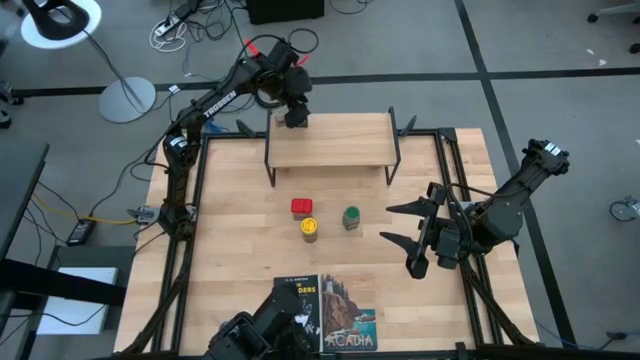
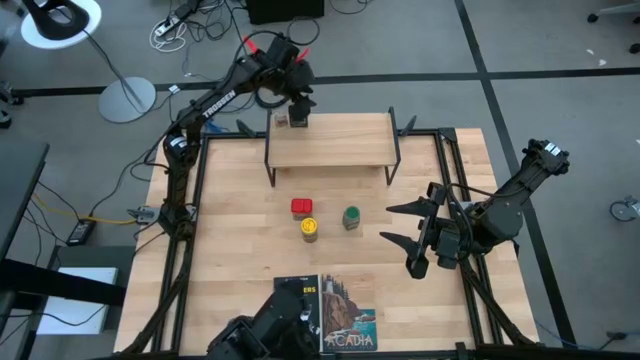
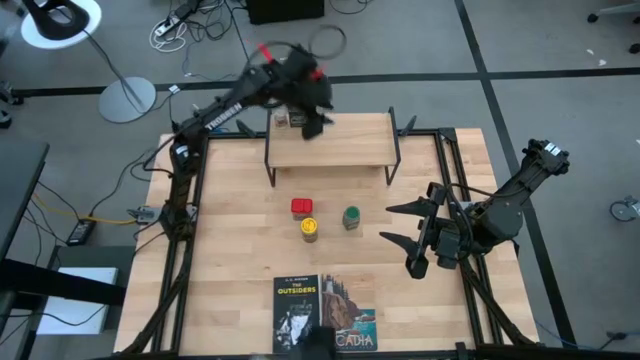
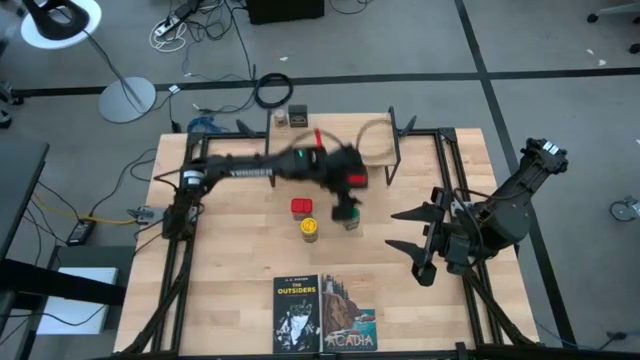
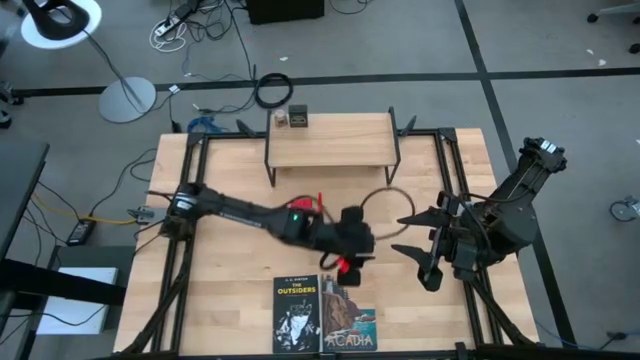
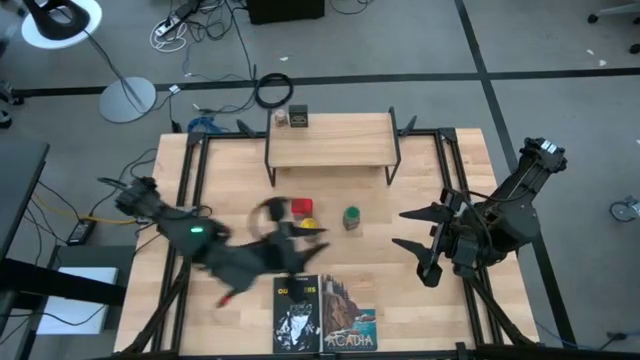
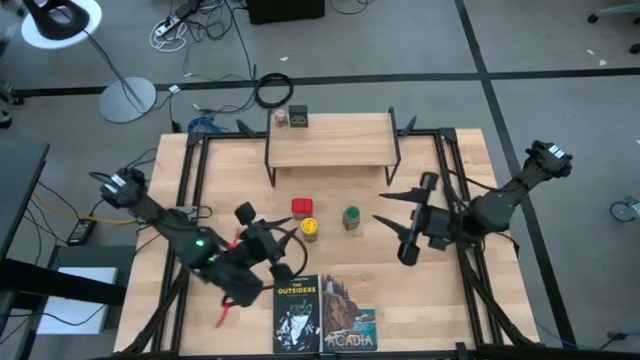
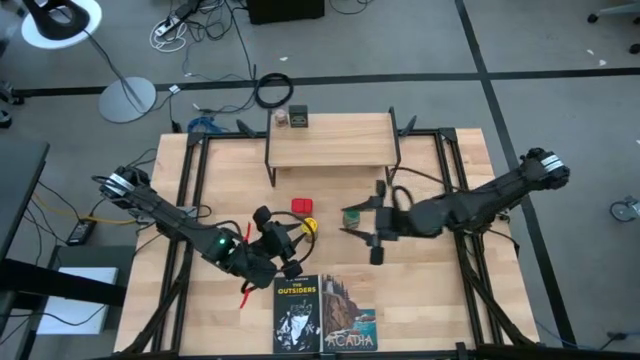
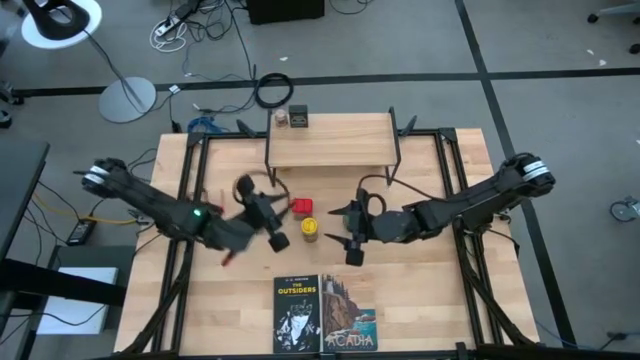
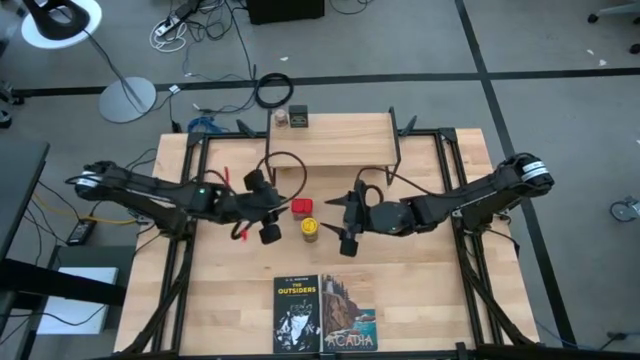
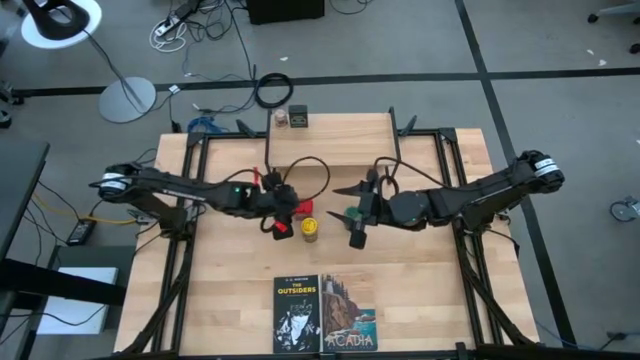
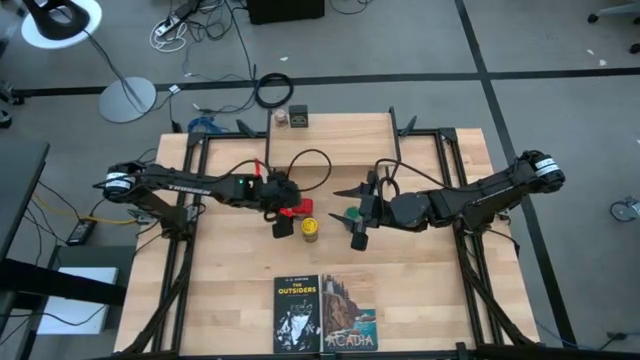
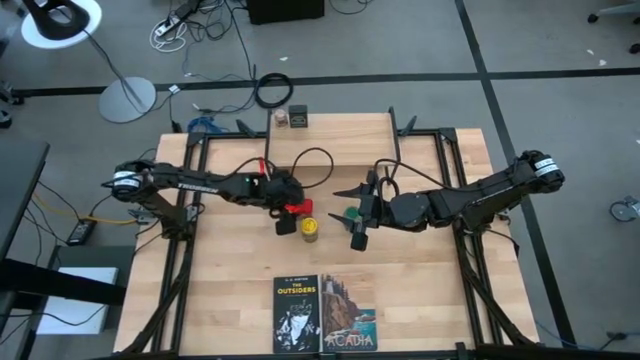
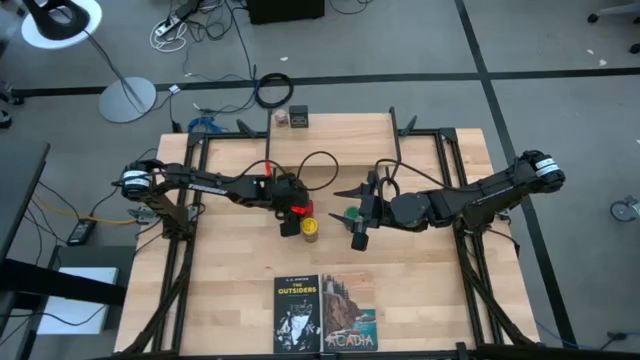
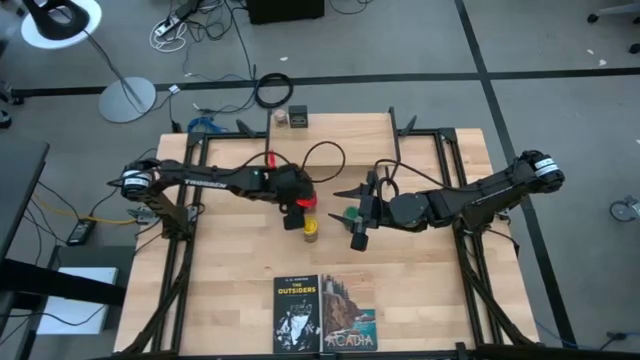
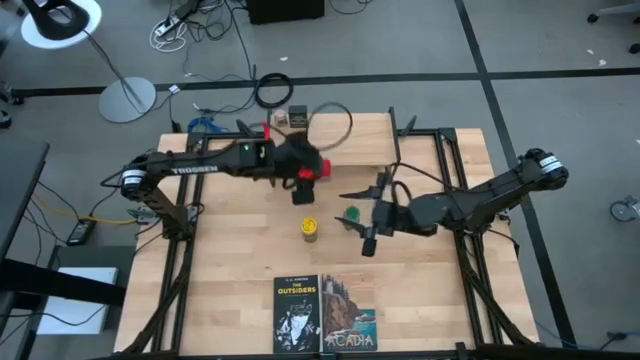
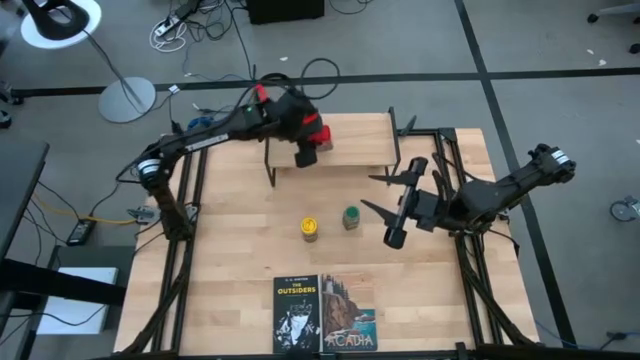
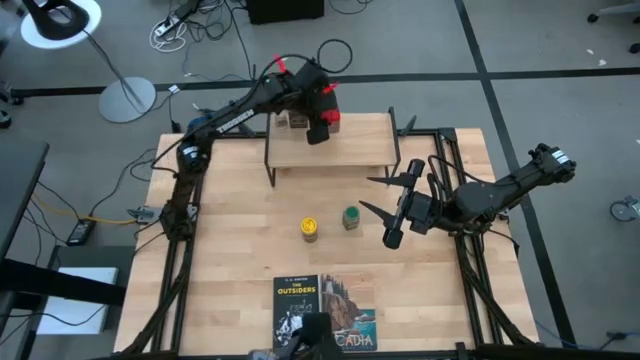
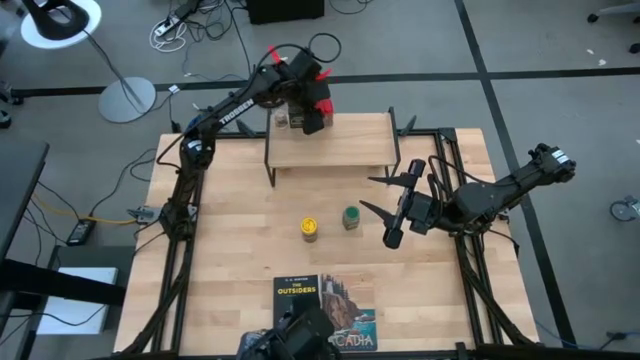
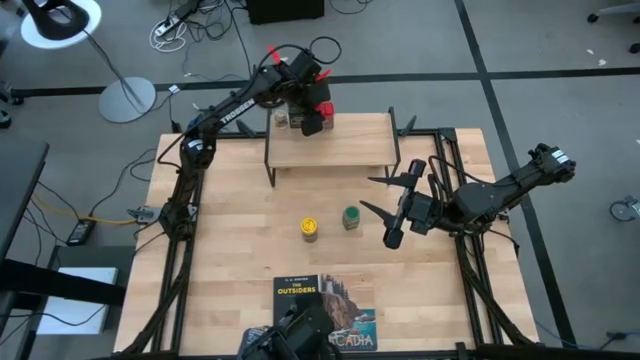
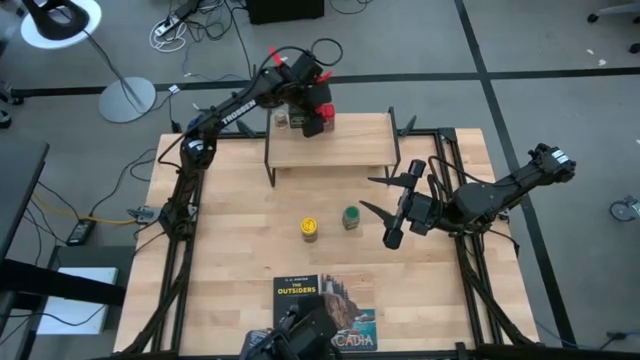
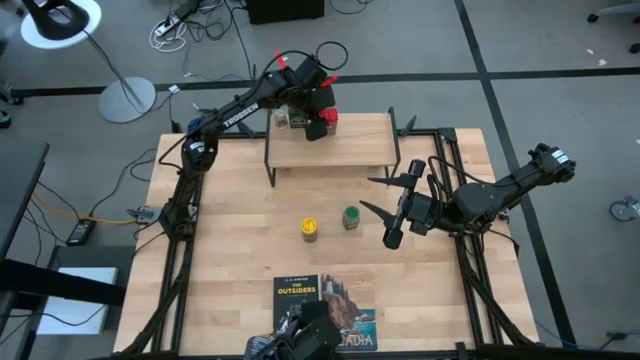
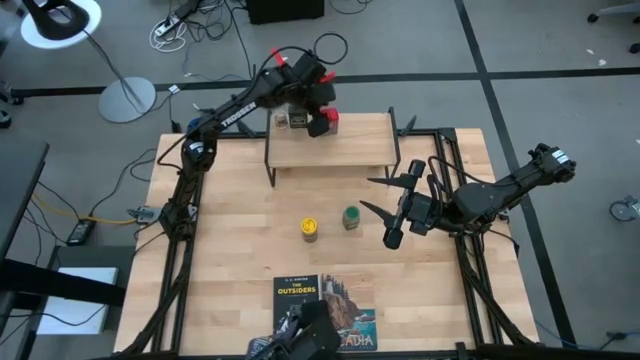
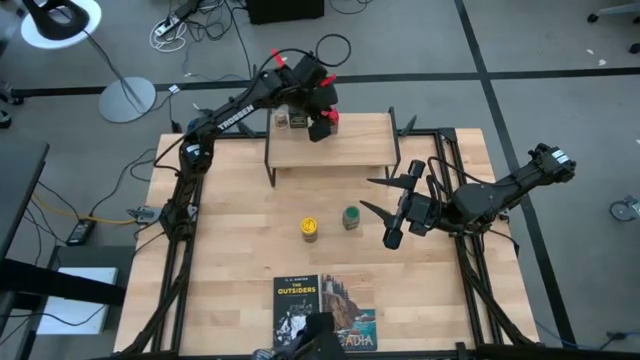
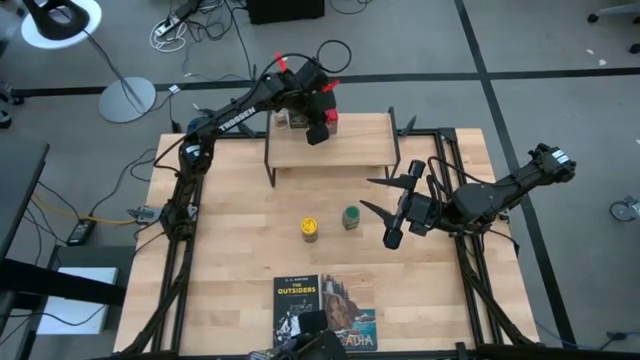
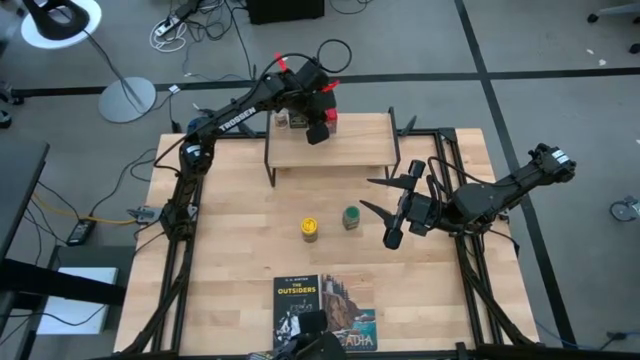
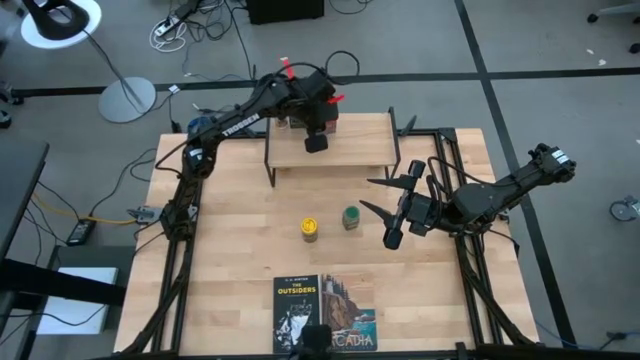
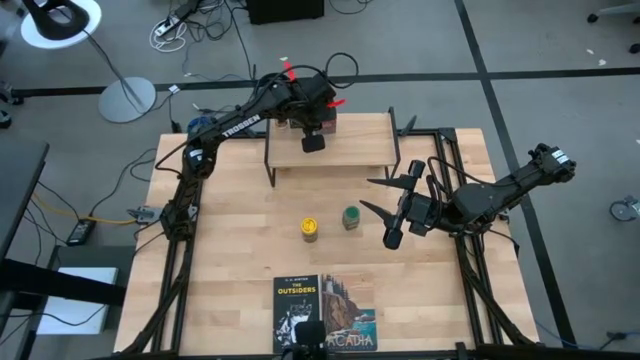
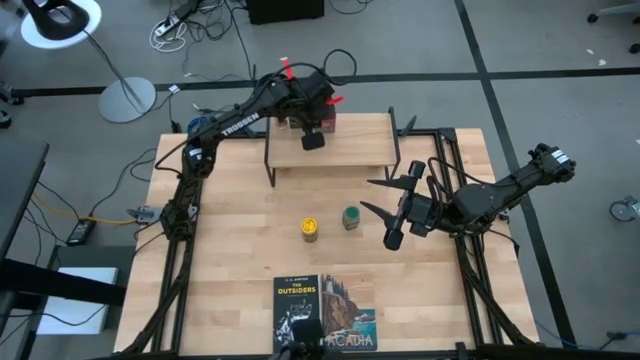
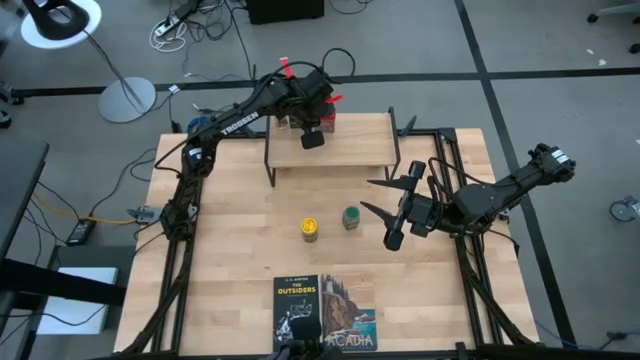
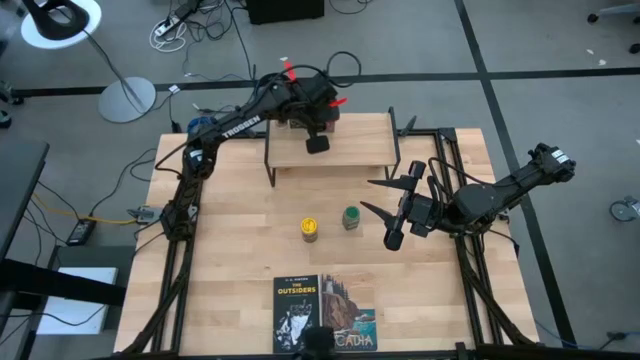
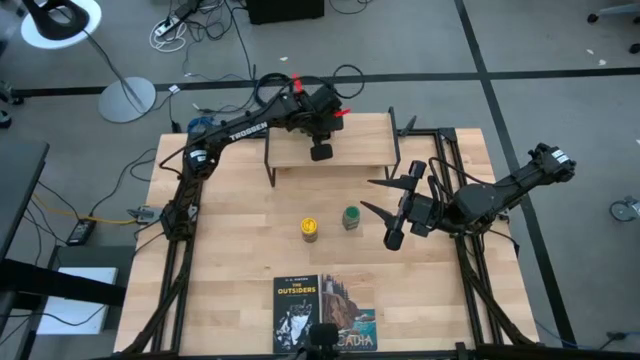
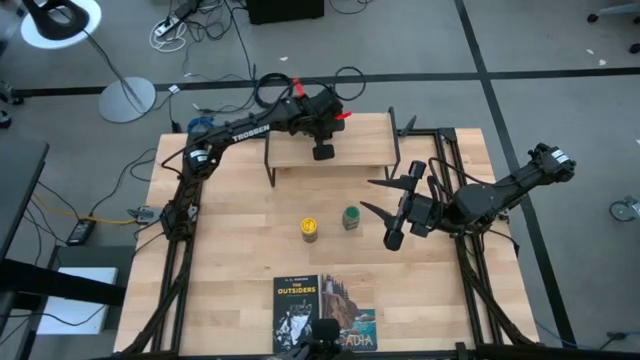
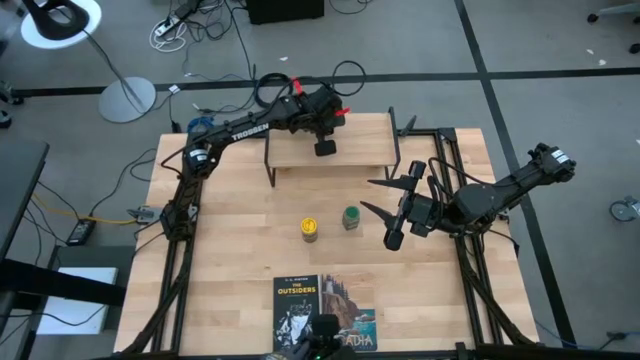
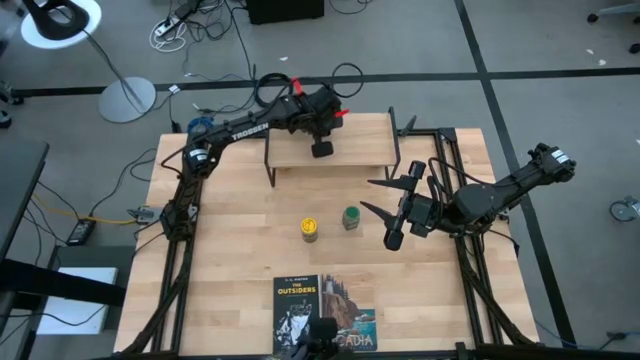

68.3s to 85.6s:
Task: Shelf spices
Put the red seasoning can on the shelf

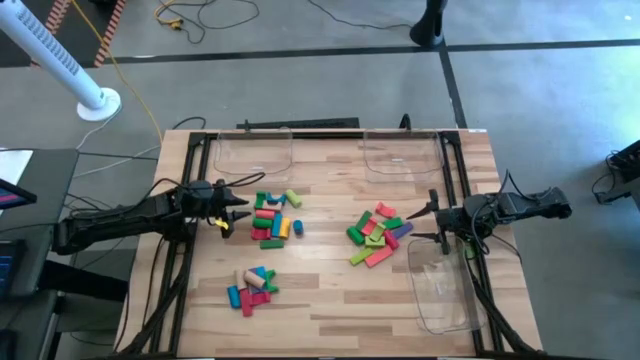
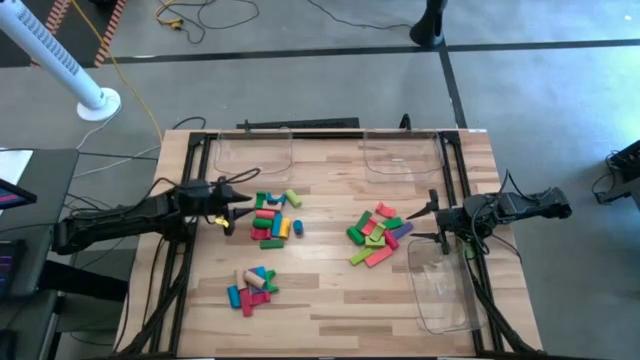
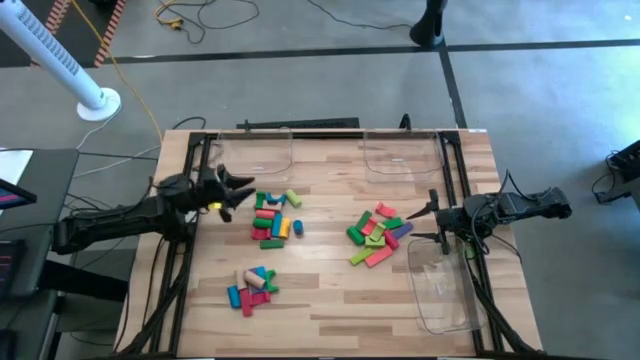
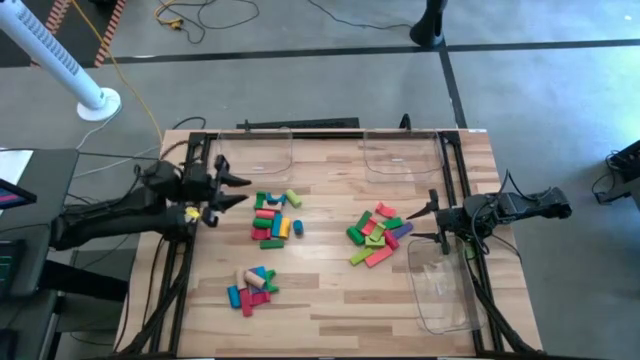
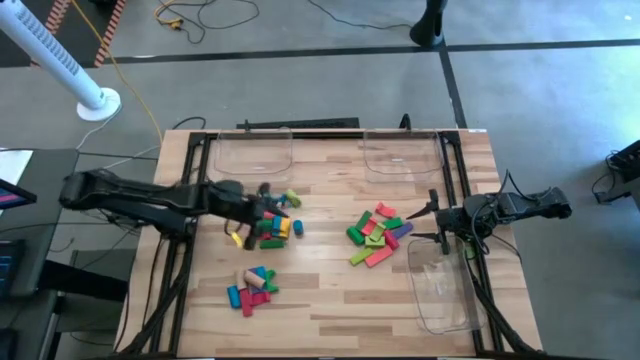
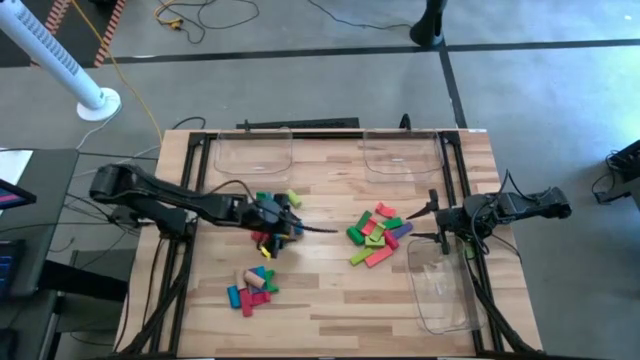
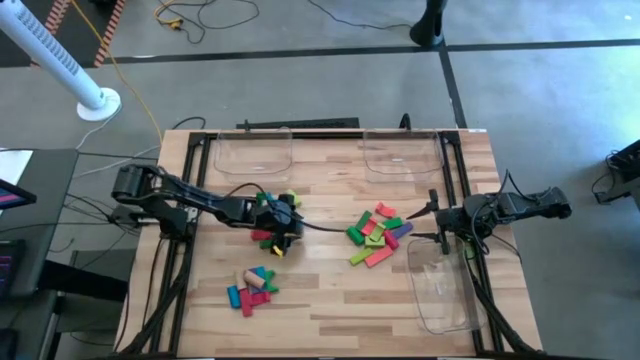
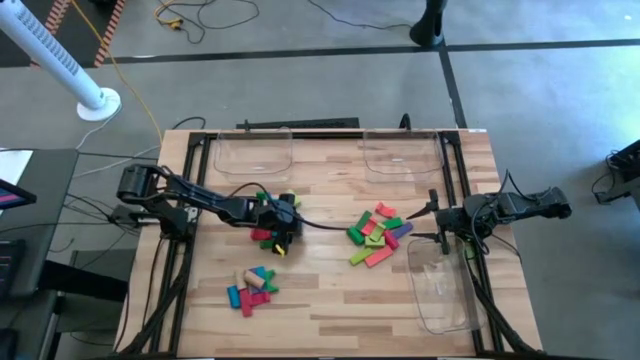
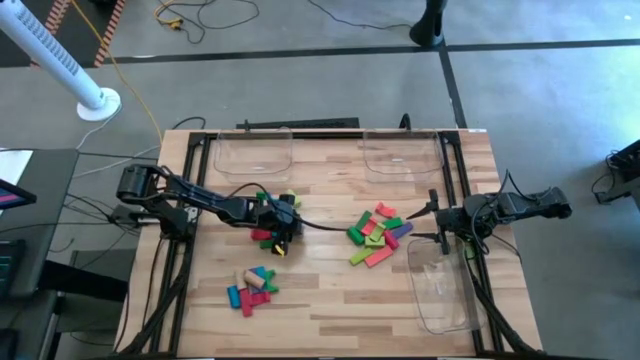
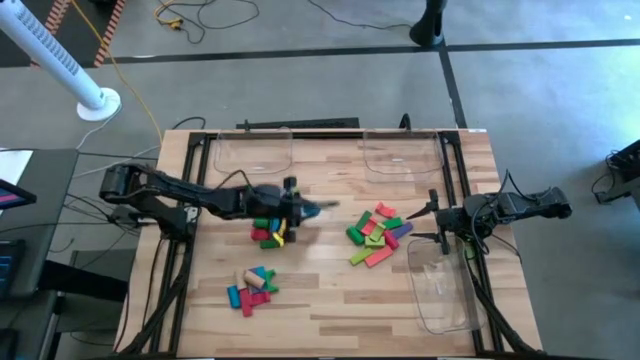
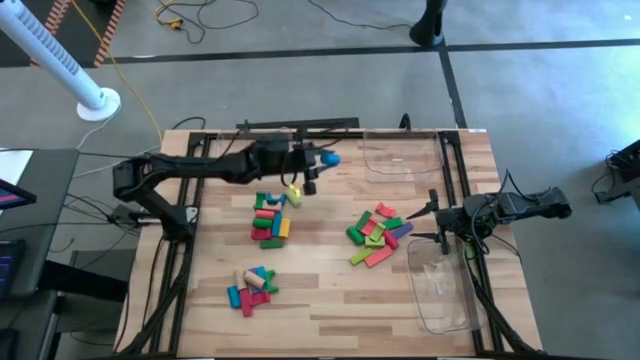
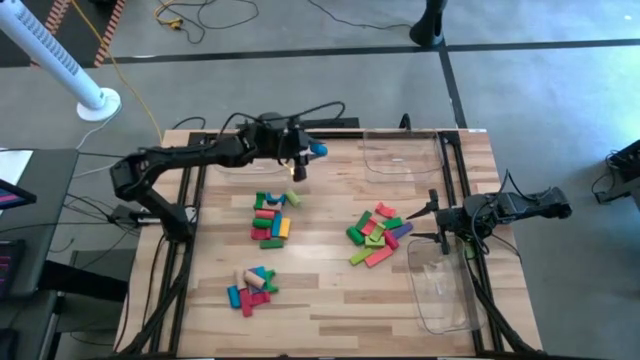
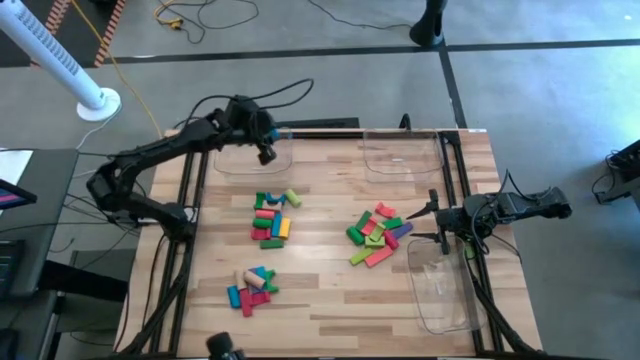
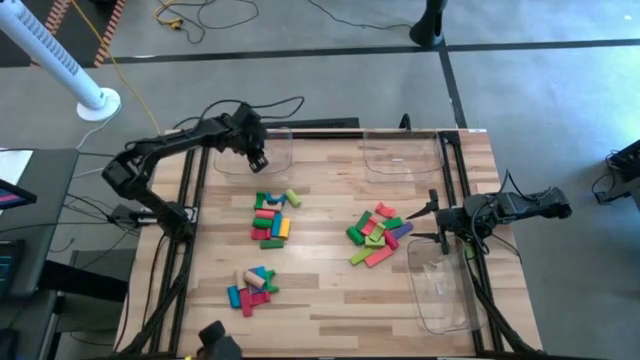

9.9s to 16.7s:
Task: Sort blocks by size
Put the blue cylindrical block into the top left transparent bin
